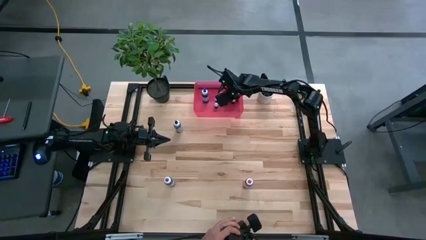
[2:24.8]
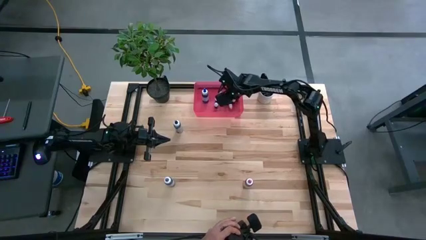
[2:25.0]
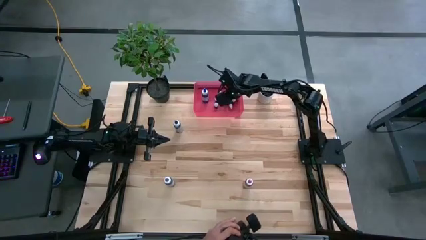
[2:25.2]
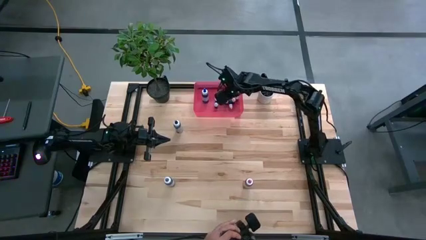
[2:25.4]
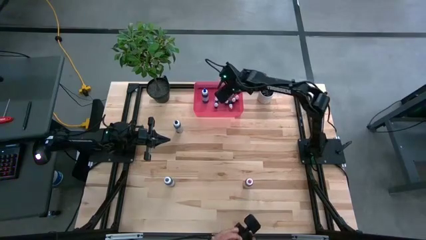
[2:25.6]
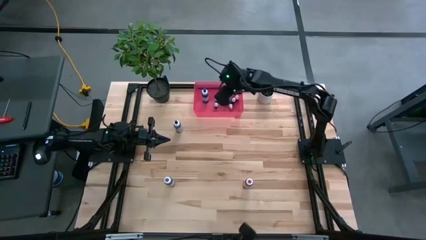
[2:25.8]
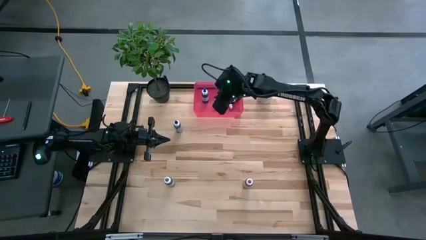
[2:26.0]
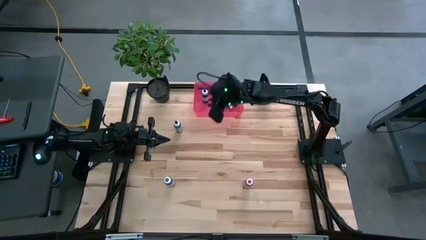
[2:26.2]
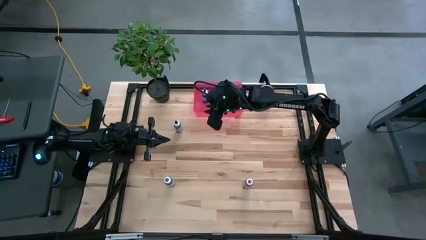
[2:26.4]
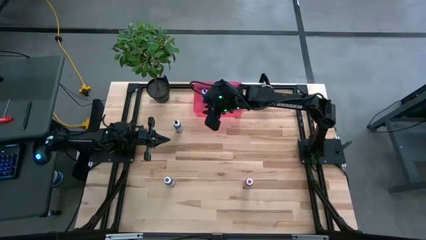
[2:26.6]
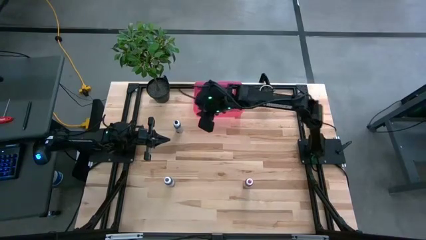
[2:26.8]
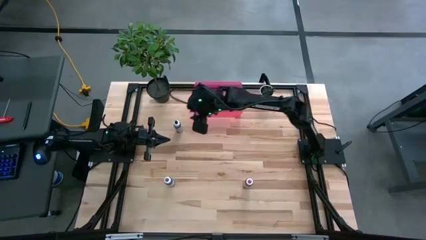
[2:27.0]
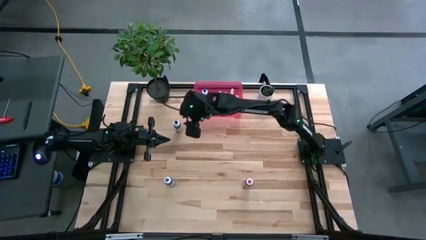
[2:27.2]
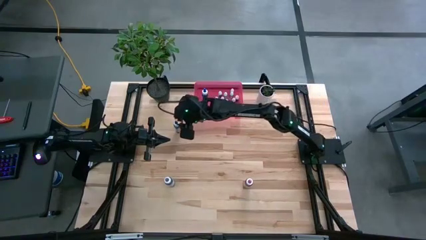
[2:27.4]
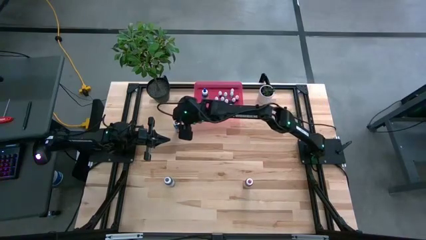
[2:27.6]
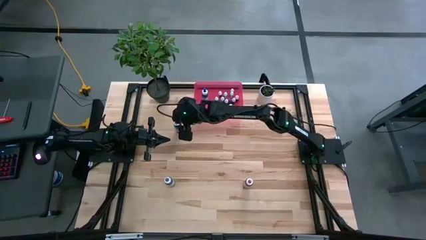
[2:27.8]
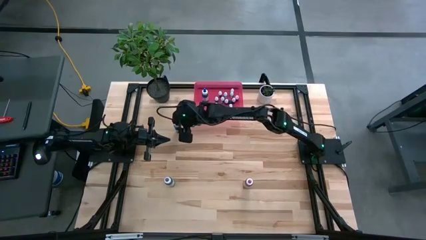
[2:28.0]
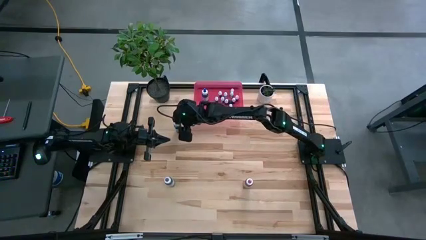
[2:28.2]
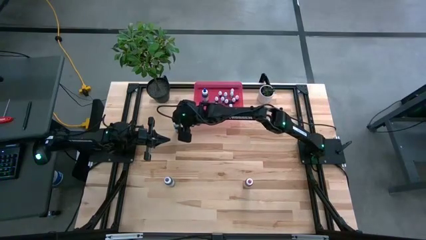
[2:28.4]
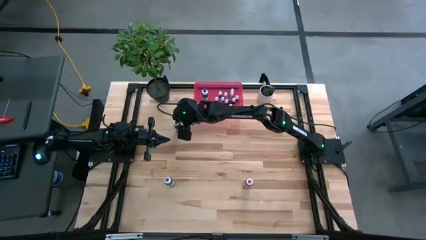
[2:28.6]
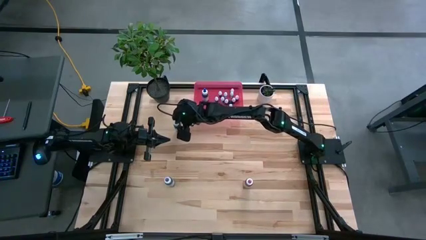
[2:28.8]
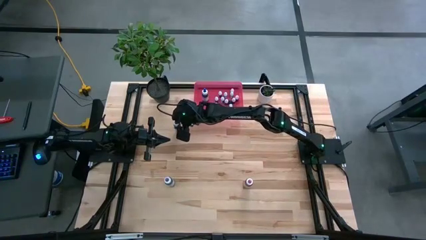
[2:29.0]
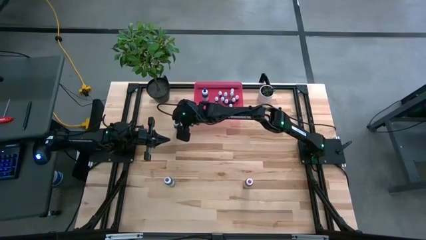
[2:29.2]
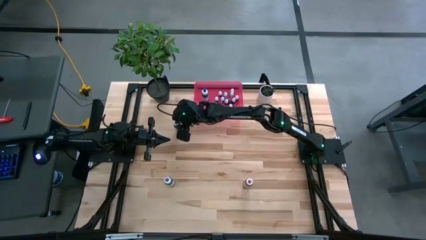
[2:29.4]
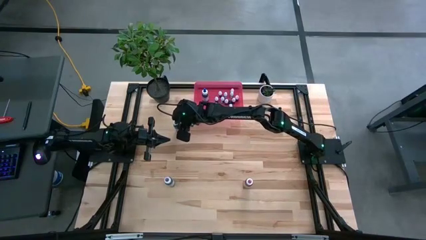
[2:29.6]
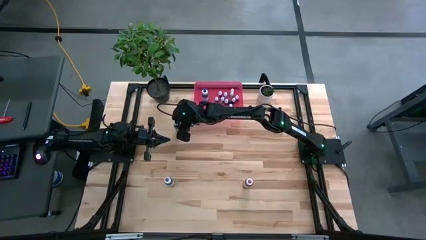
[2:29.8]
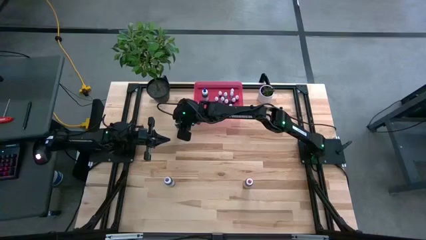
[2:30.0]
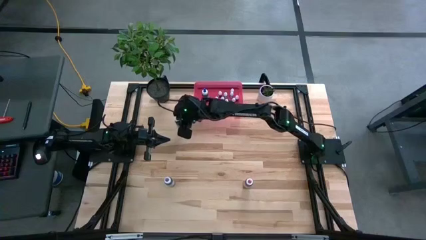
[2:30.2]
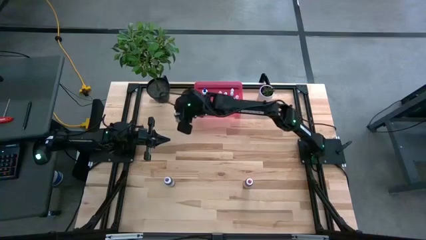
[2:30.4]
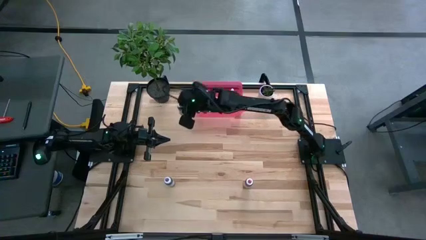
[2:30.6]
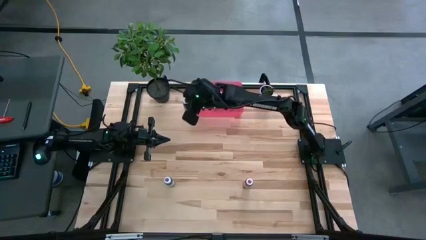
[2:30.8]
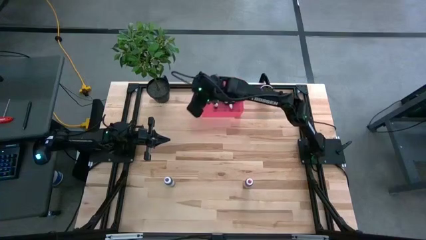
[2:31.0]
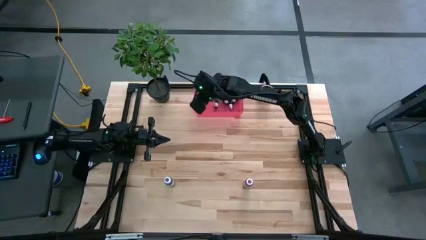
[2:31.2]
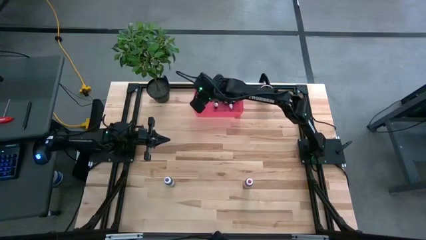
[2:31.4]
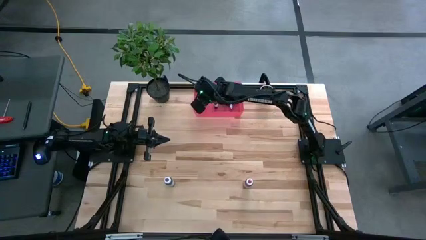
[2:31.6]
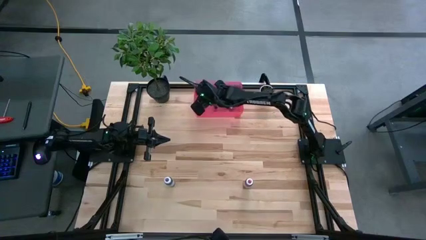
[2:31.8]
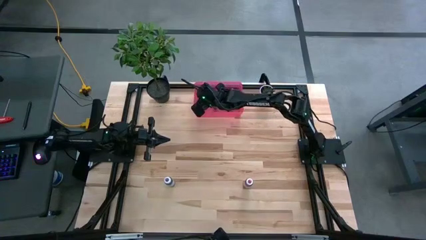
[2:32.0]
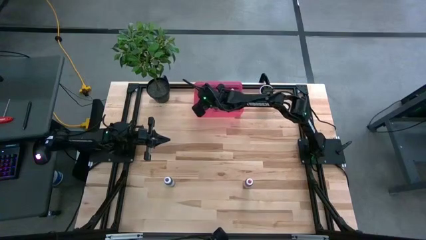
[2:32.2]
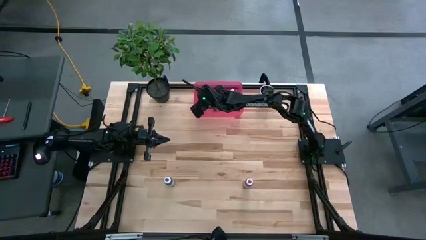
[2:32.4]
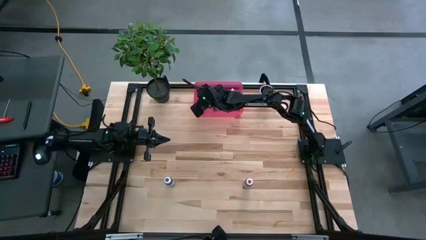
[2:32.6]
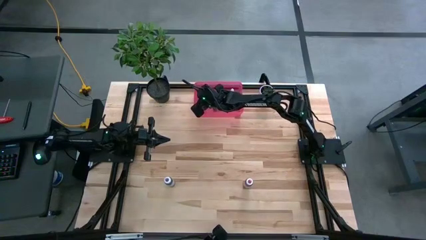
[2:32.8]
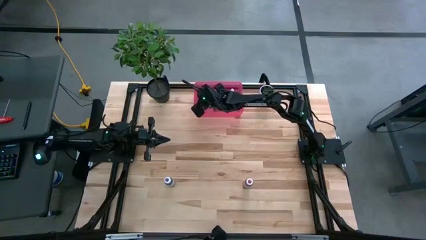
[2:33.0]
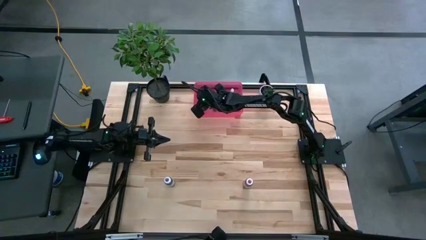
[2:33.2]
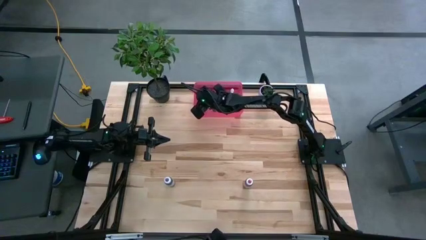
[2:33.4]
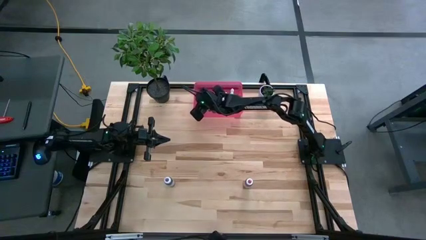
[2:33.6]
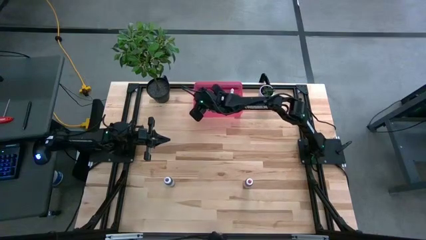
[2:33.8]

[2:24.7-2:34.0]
Task: Pick & Place food coloring
Put the large black food coloring bottle into the red bin

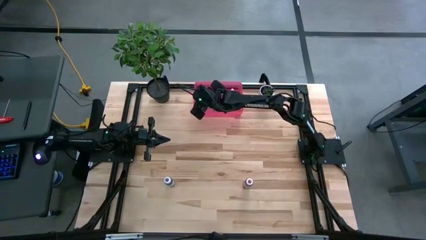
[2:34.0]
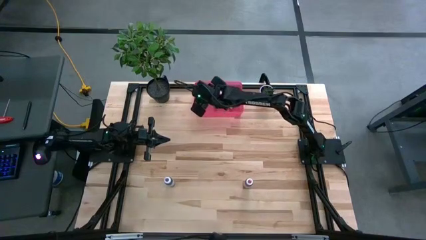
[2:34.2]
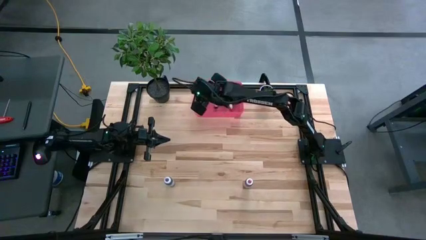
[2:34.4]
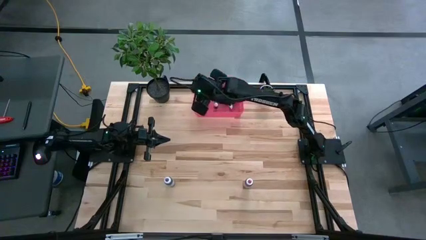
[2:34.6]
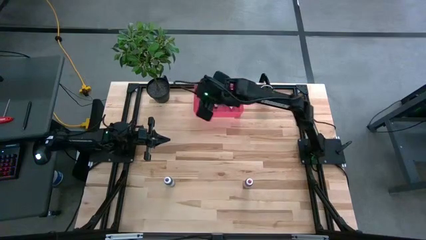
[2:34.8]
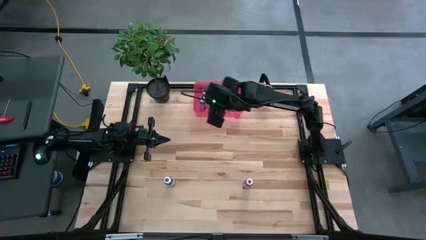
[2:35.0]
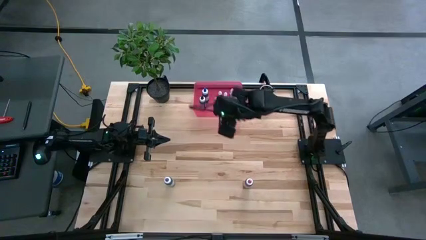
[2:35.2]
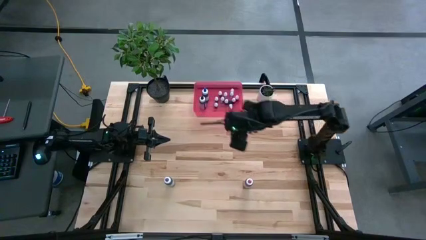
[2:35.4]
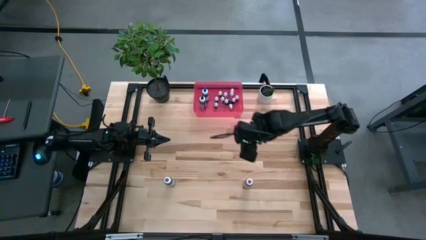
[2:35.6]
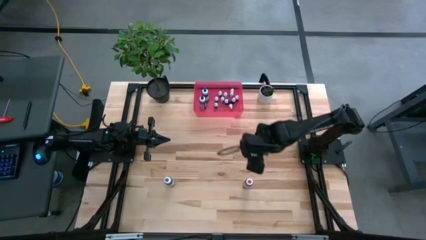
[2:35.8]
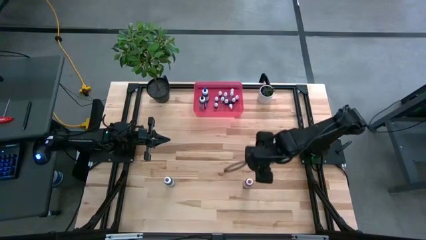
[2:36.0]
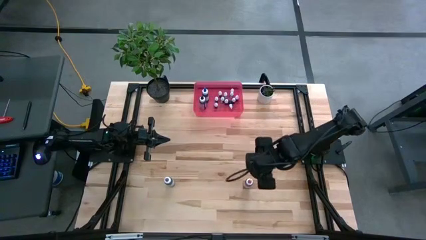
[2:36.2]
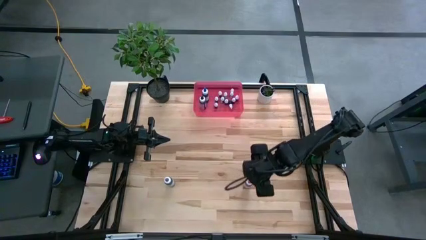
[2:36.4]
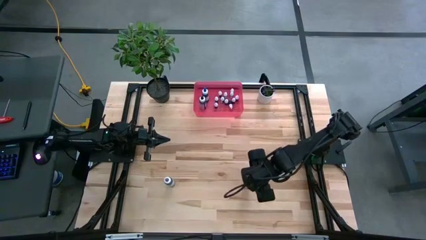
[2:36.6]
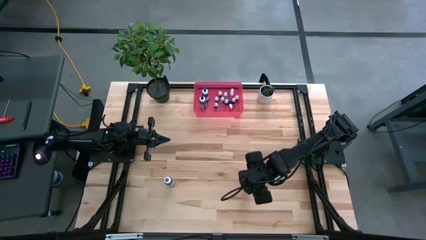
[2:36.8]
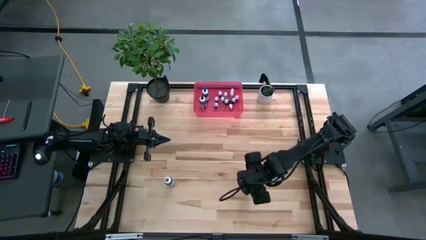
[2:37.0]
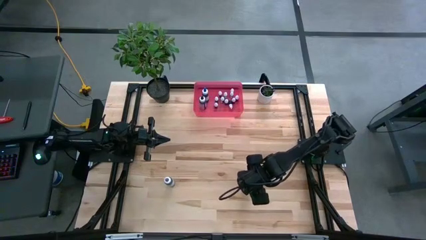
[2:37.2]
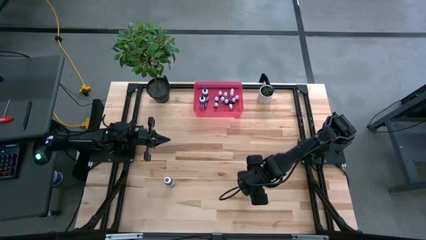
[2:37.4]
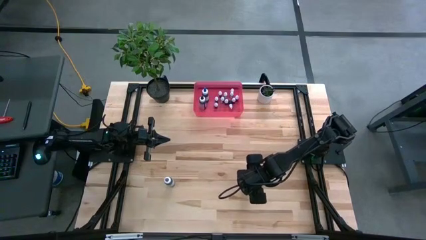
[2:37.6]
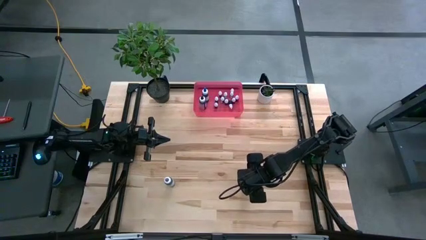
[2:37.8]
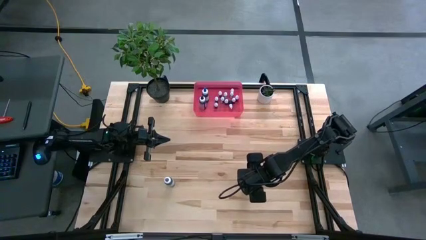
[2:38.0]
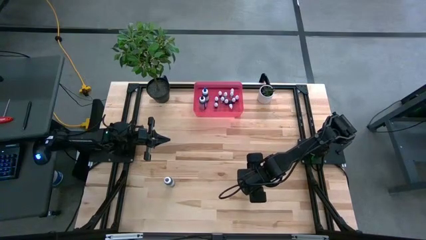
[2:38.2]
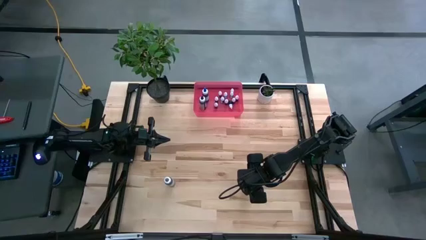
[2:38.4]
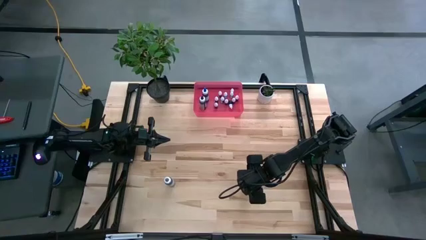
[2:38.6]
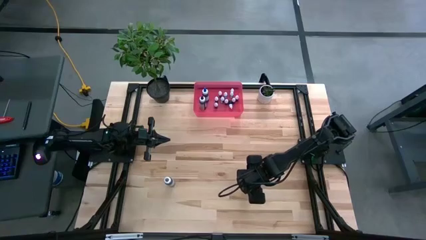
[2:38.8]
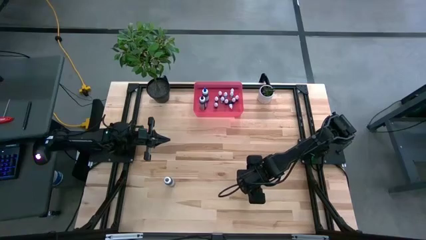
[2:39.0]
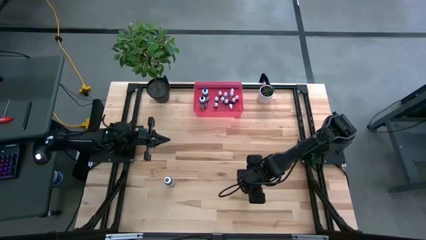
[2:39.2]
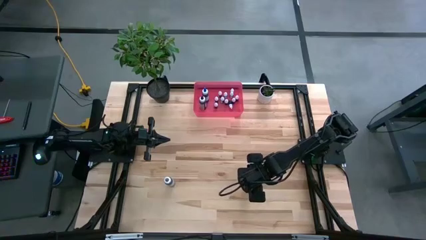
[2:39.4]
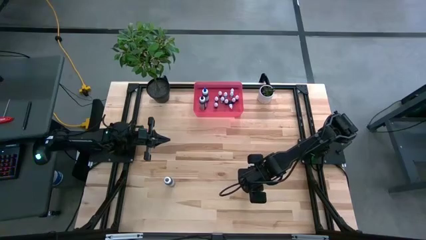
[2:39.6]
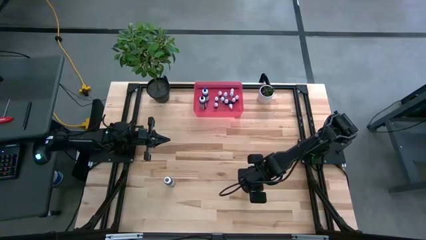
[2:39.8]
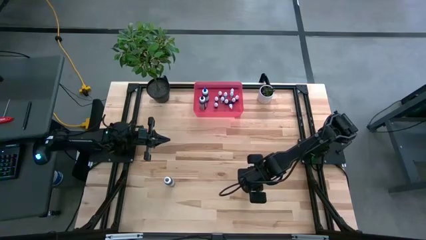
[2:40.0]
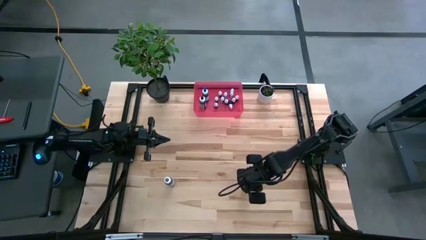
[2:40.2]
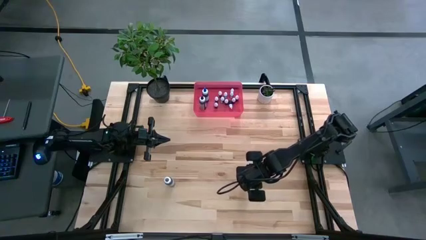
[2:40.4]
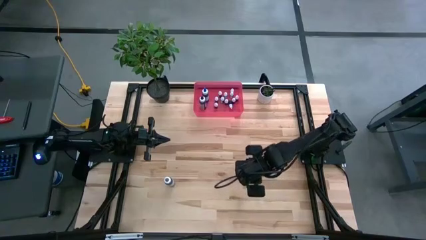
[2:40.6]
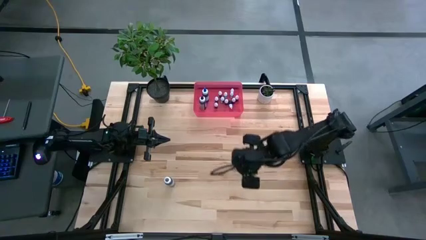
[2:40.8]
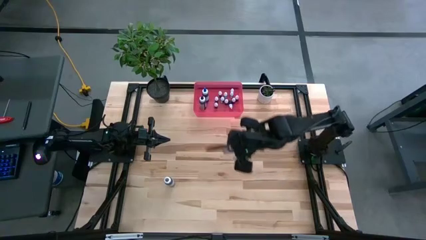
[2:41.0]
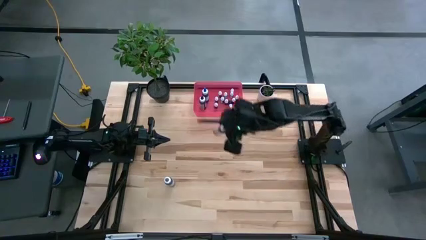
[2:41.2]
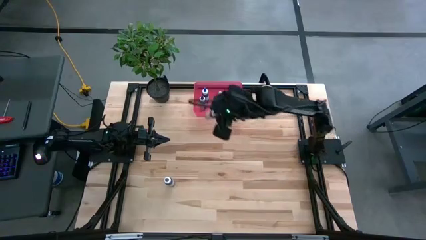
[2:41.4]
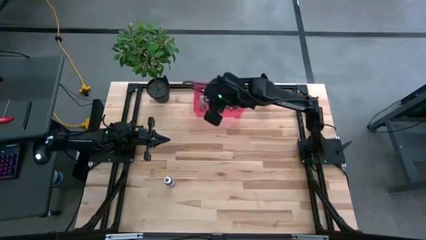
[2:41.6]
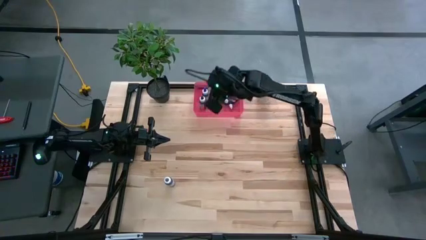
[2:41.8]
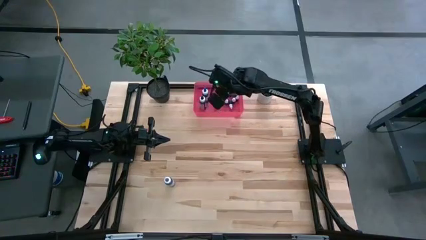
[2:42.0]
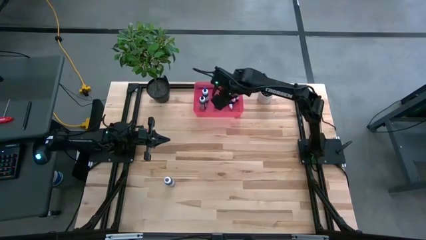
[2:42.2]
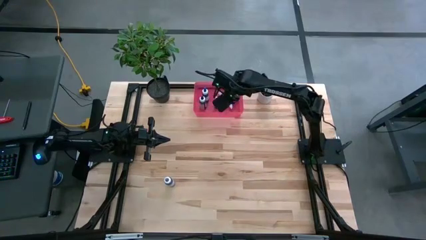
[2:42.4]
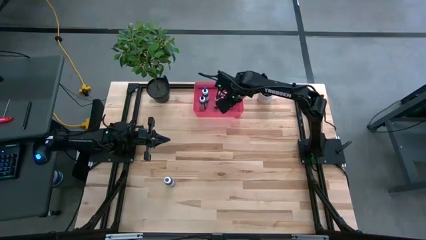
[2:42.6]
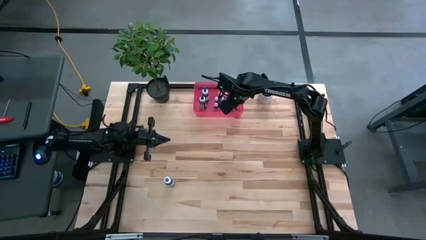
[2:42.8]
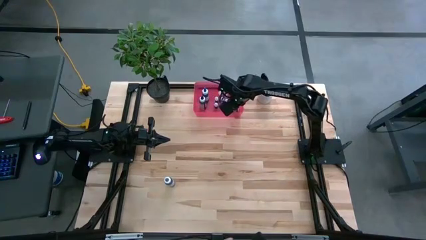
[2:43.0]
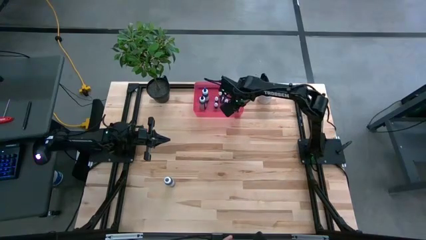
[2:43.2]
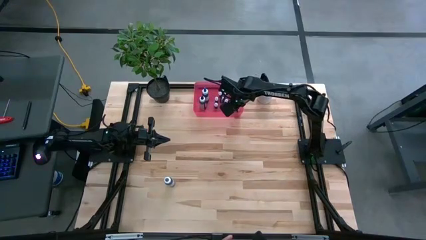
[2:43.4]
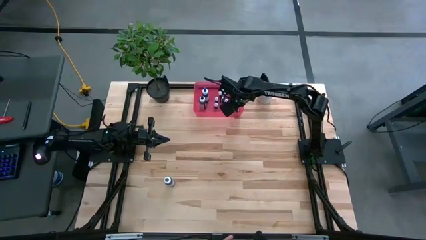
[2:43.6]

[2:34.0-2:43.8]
Put the large pink food coloring bottle into the red bin
